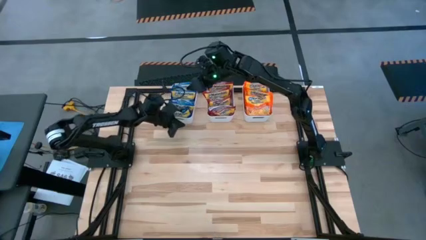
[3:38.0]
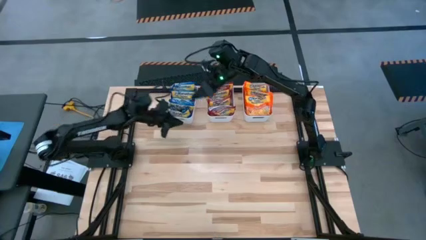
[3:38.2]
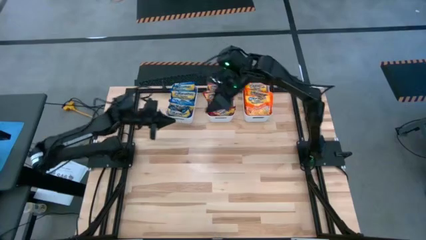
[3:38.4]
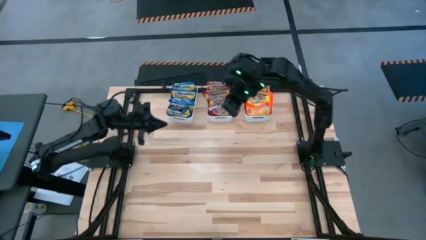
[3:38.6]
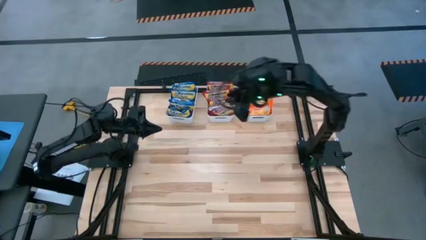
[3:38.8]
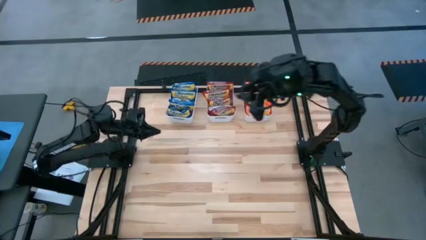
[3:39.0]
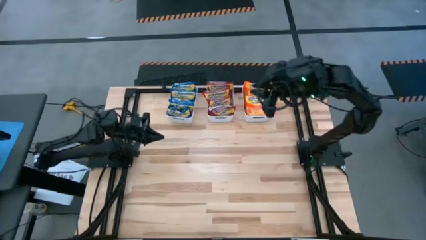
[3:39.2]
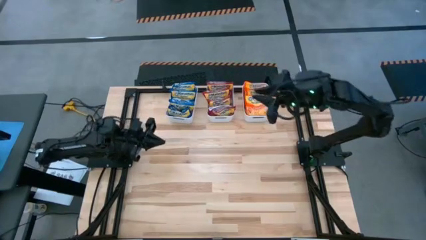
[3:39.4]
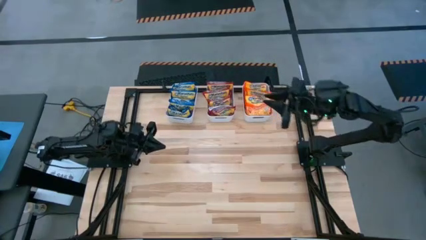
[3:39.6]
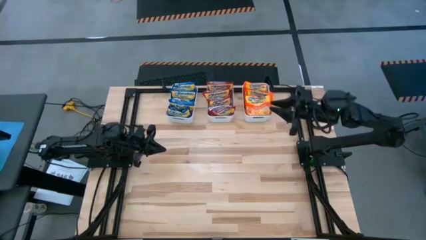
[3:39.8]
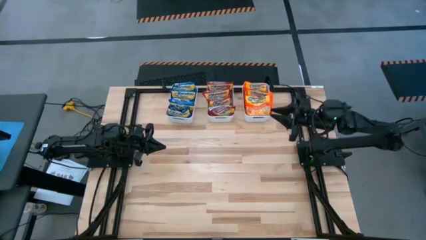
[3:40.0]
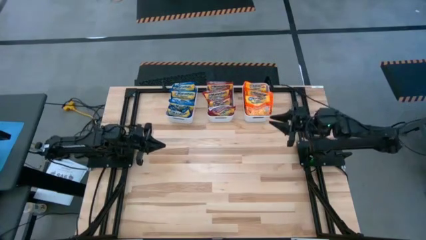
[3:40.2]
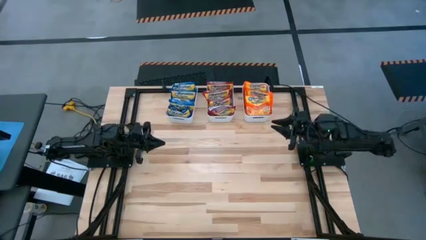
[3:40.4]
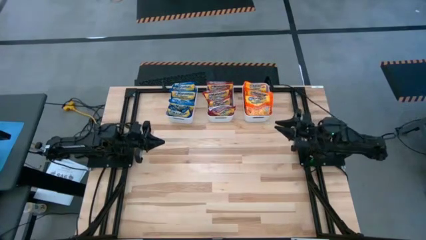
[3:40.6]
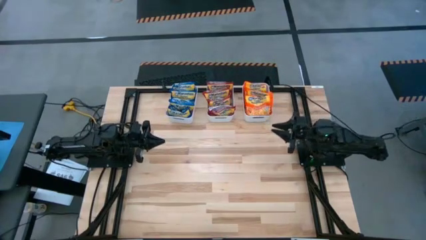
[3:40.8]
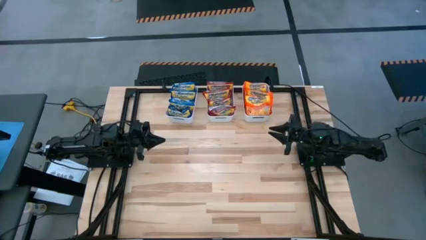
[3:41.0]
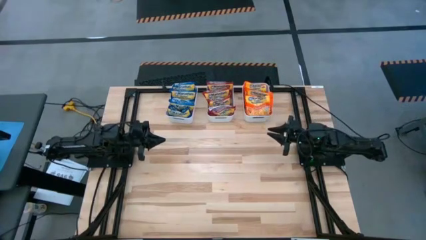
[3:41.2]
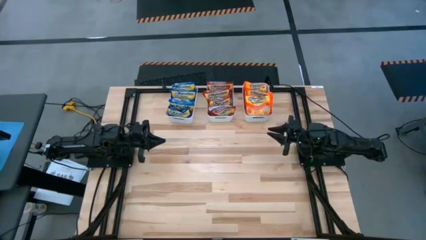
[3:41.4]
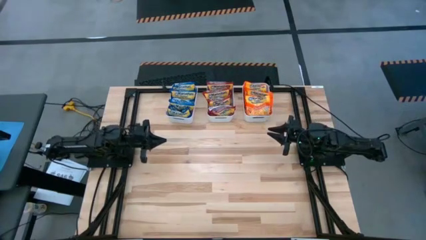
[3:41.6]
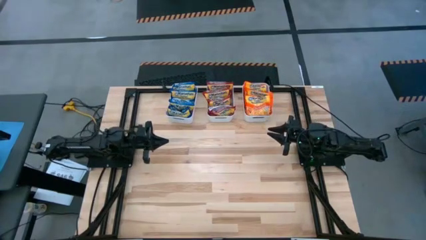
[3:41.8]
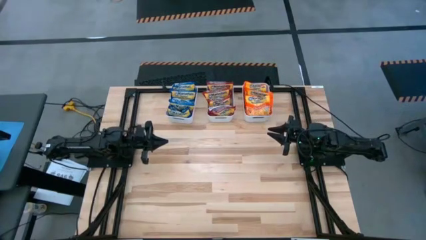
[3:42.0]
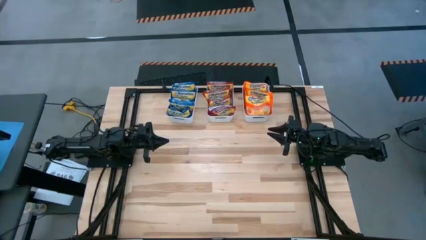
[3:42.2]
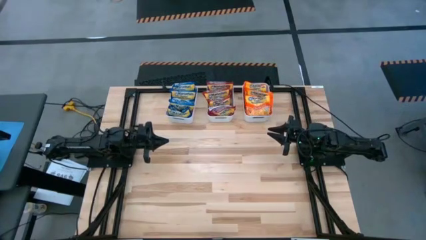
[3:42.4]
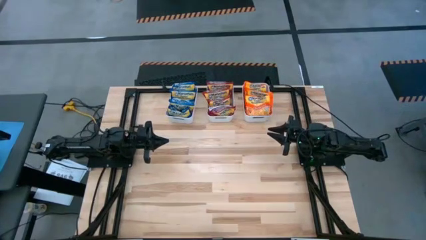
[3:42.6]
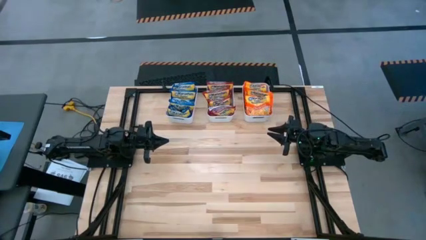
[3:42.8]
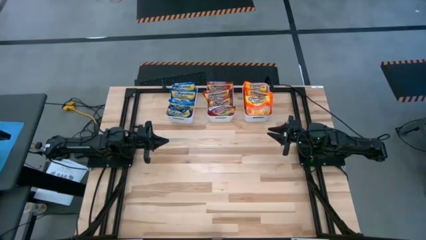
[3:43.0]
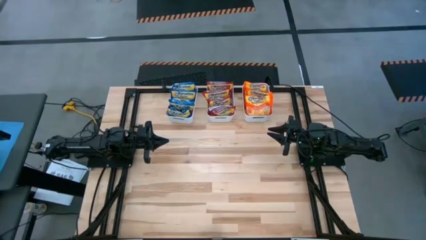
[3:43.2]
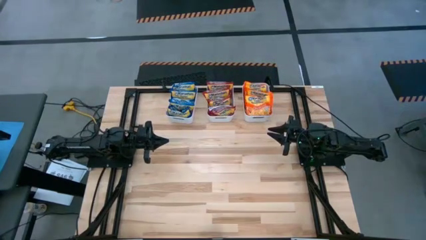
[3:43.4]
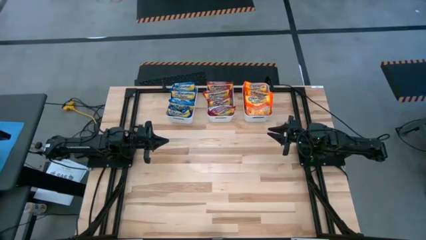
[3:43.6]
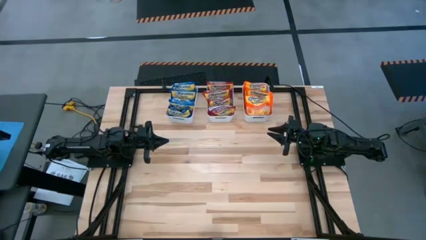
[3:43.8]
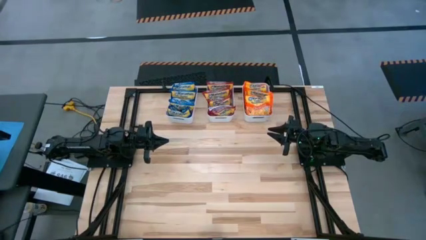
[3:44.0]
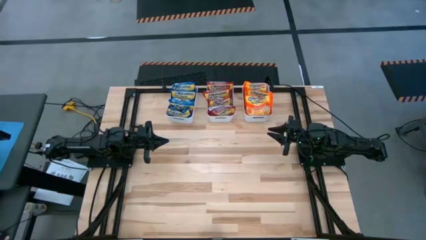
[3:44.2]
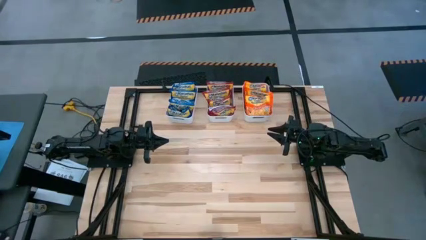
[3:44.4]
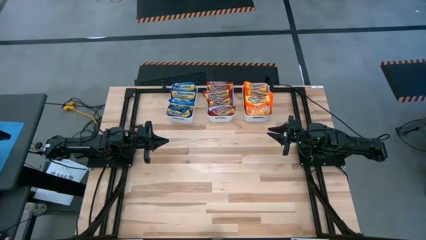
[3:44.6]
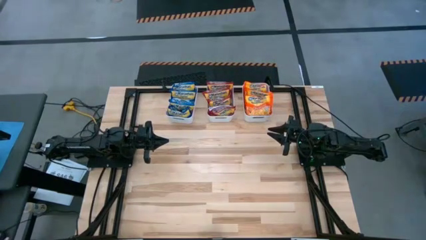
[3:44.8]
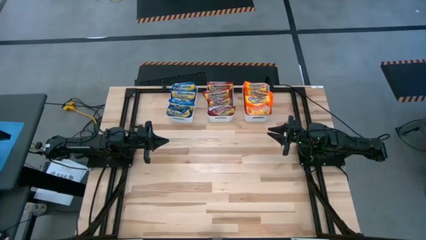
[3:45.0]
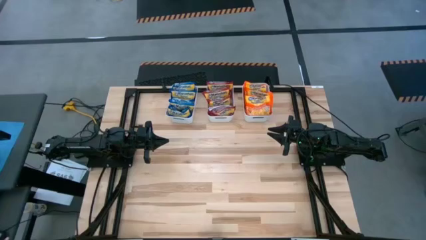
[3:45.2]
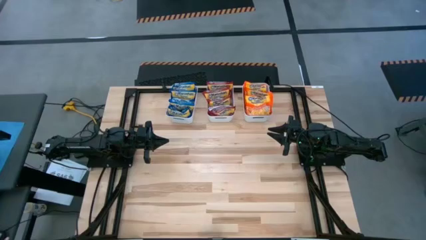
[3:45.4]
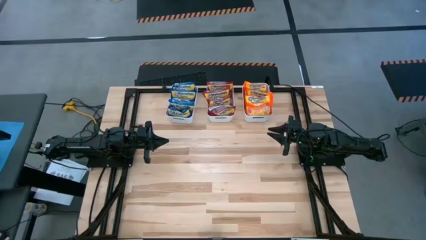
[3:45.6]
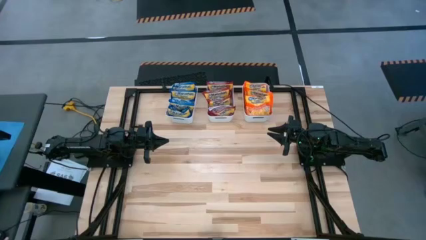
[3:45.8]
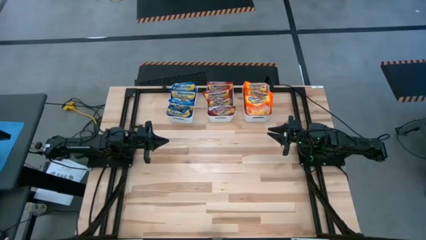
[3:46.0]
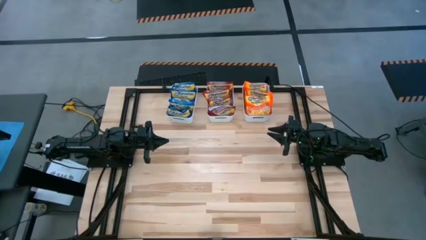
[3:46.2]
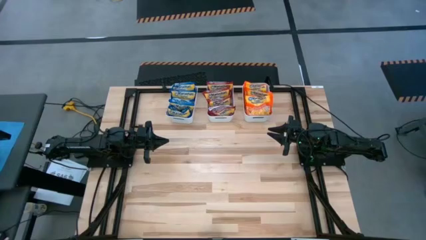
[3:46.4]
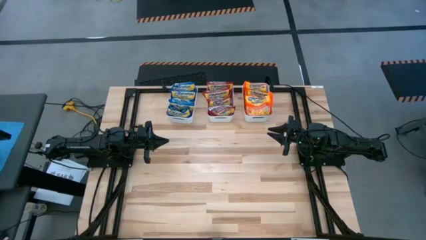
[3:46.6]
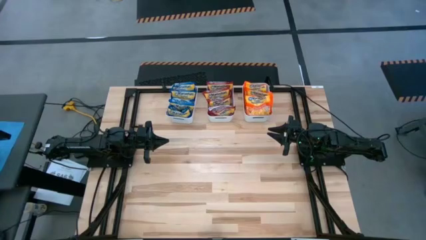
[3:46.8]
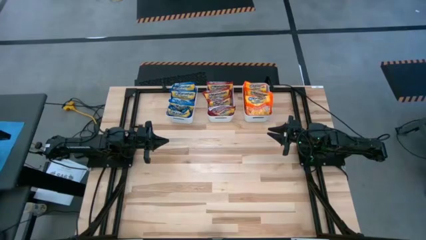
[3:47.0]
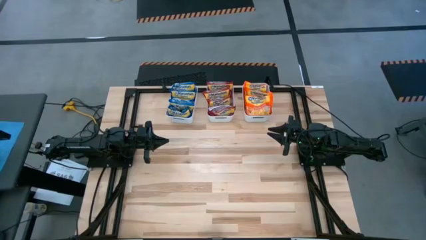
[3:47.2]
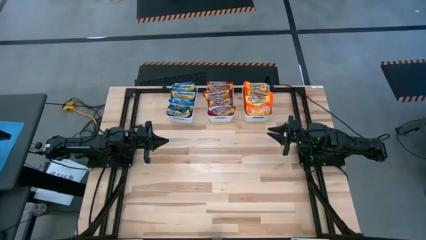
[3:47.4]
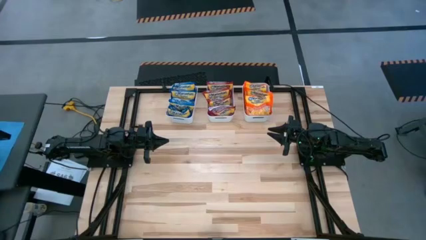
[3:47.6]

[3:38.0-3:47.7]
Task: Sort Maruchan noodles
Return to Home Position

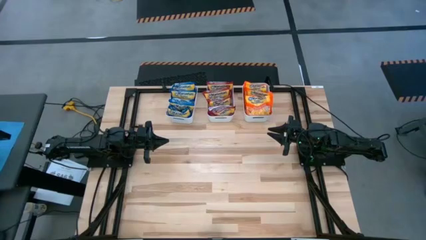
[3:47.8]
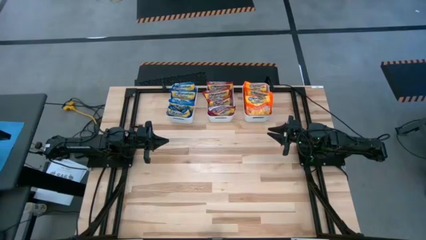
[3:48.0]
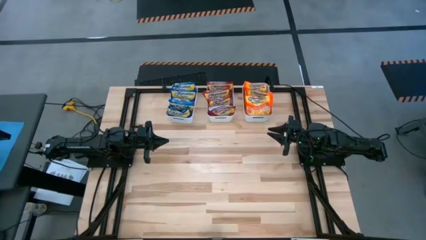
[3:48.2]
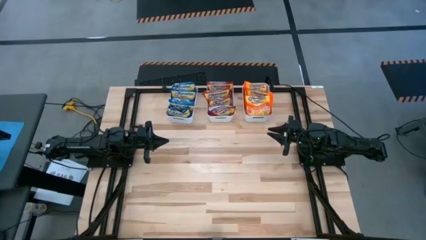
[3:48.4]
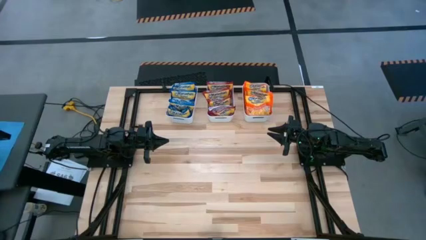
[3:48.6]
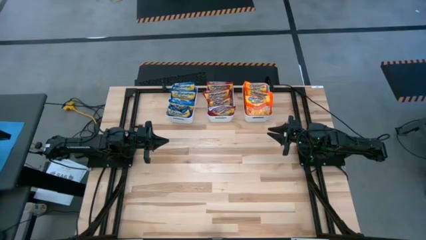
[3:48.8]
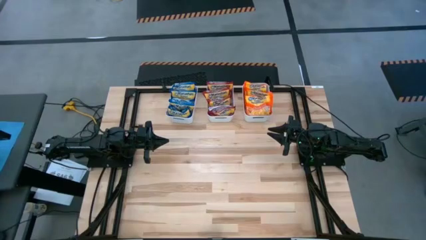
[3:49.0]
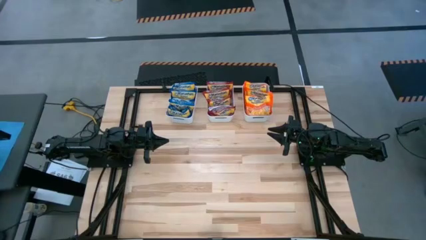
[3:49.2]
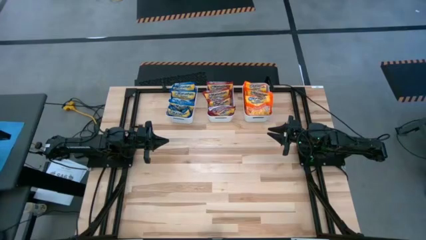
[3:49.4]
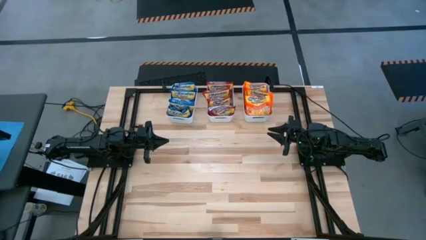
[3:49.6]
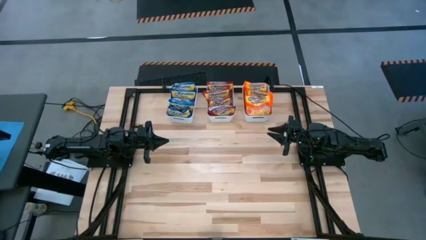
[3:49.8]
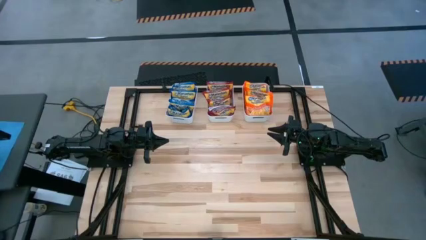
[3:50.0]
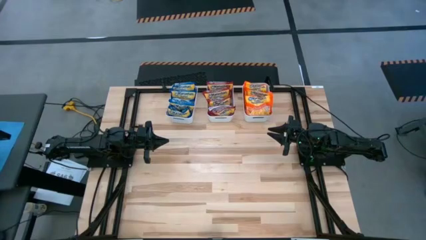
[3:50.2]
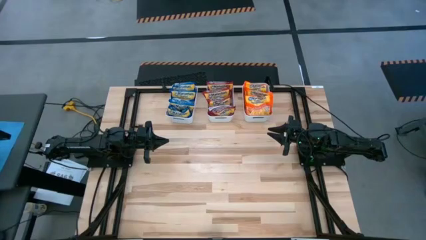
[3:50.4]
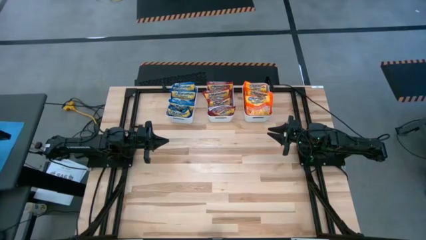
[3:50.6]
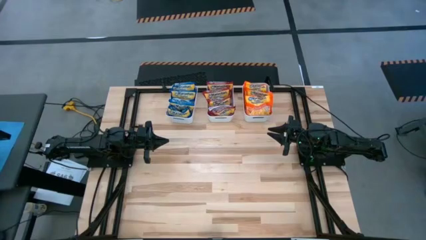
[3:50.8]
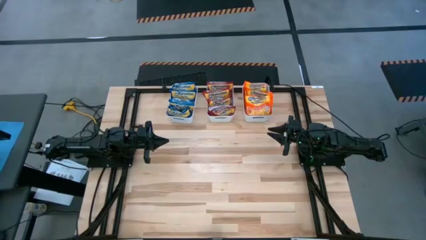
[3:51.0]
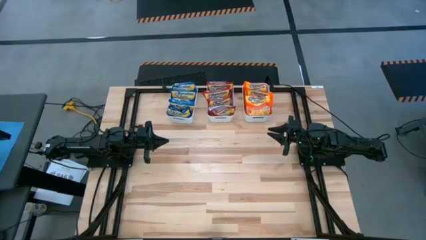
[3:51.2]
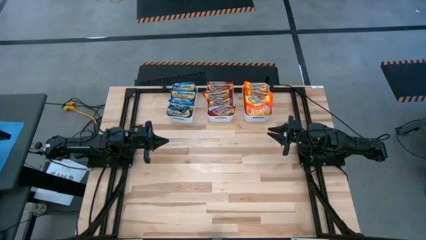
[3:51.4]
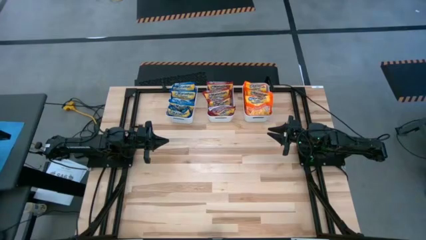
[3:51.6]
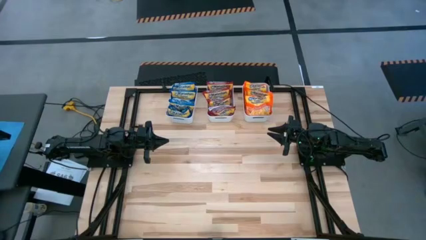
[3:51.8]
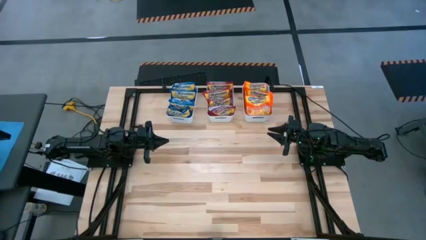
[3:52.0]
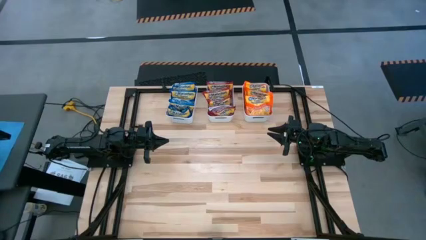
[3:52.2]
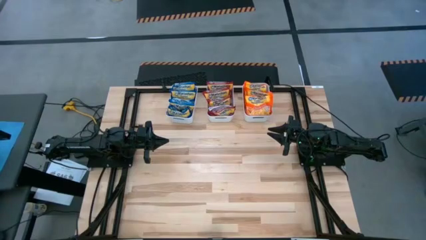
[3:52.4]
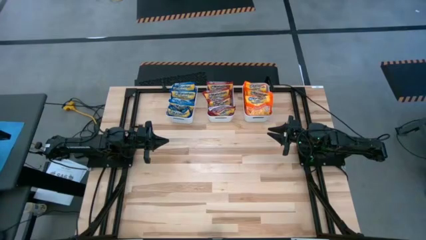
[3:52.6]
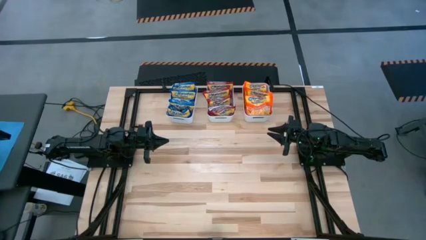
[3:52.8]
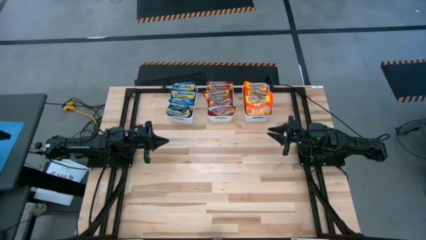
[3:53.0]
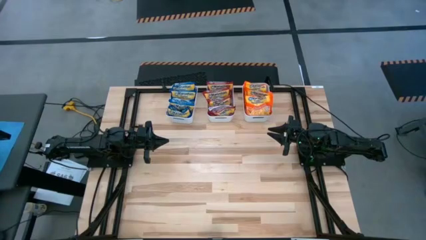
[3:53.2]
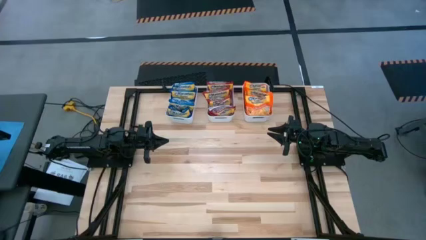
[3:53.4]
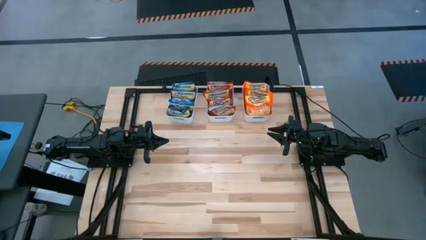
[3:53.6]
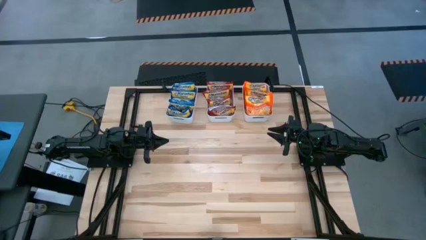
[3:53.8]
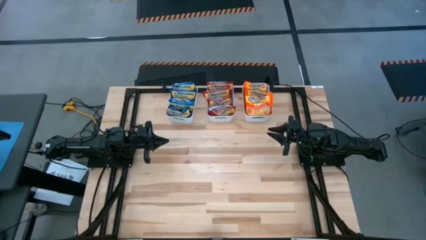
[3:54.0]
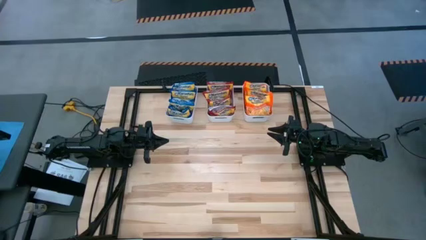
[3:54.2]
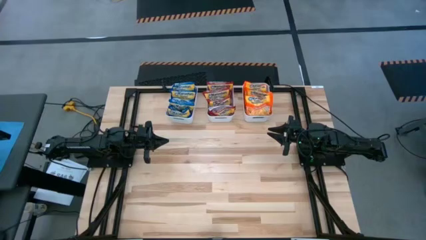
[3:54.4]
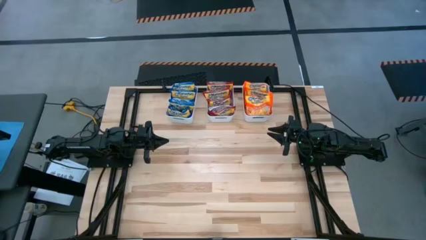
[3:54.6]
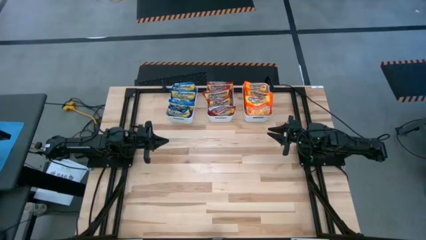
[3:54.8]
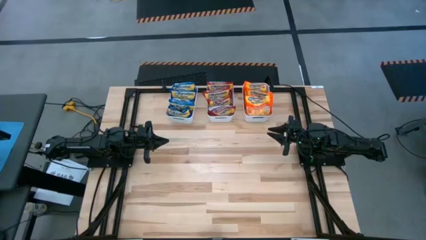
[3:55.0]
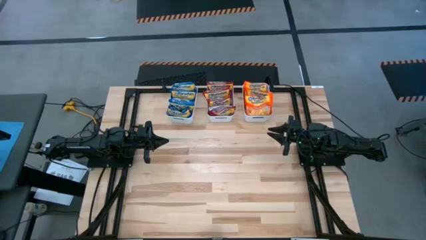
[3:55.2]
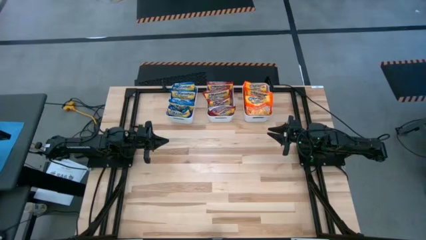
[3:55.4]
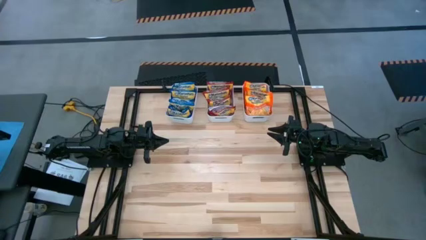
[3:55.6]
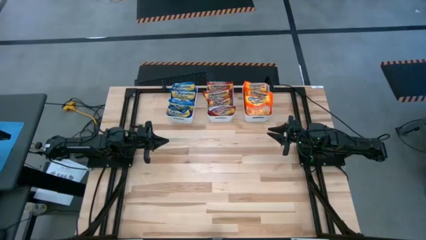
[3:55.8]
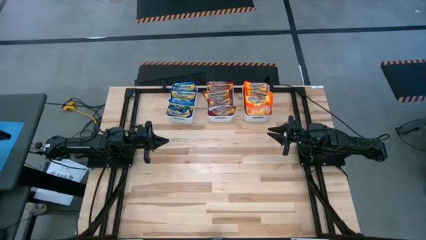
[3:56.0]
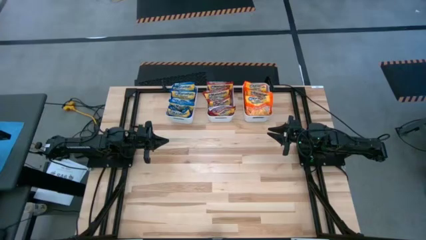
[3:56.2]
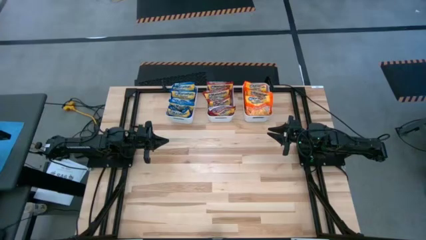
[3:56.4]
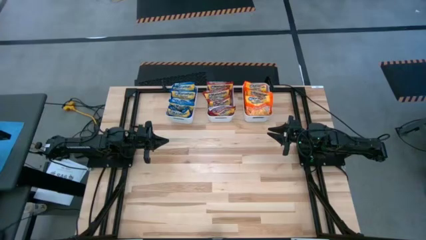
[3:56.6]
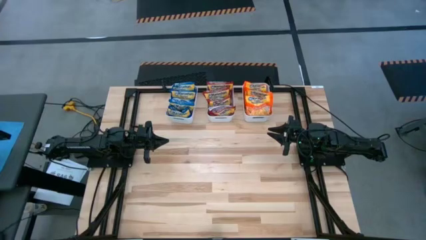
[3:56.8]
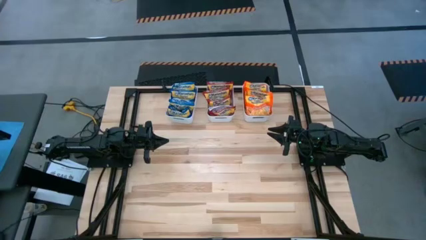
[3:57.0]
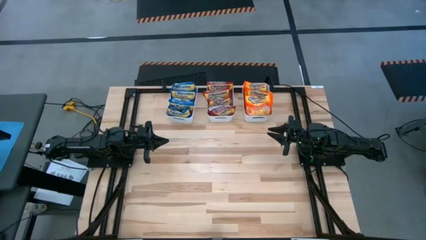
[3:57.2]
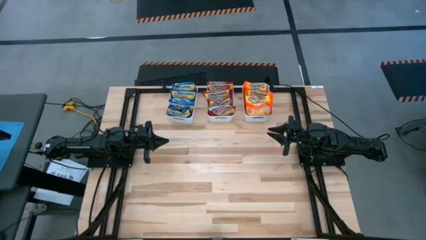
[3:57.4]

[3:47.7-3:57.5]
Return to Home Position
